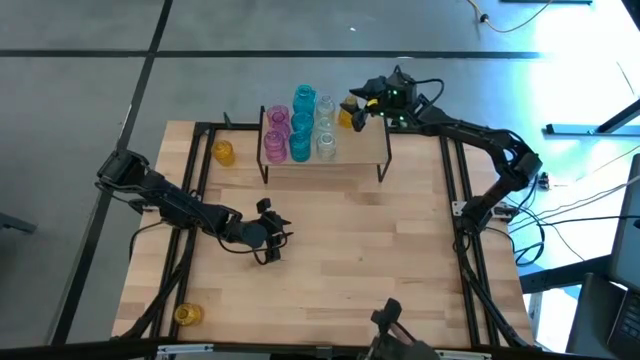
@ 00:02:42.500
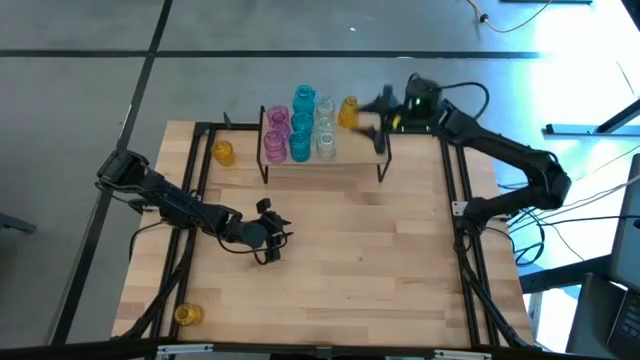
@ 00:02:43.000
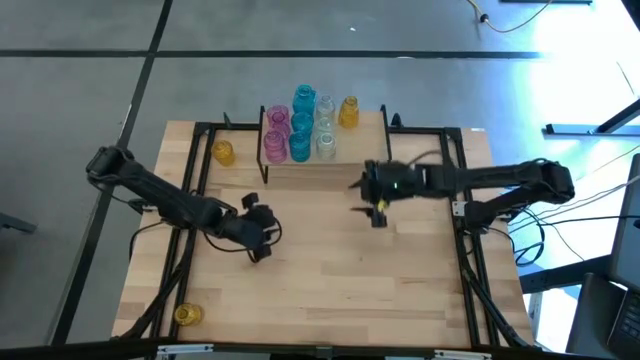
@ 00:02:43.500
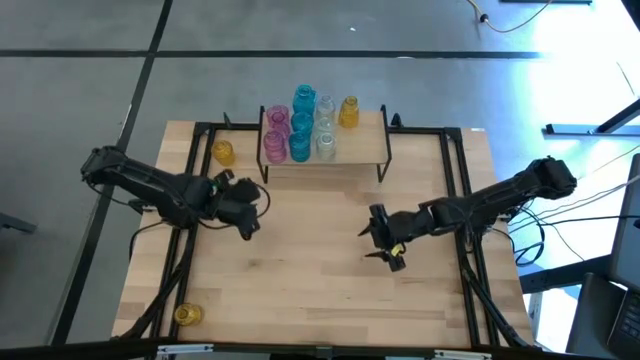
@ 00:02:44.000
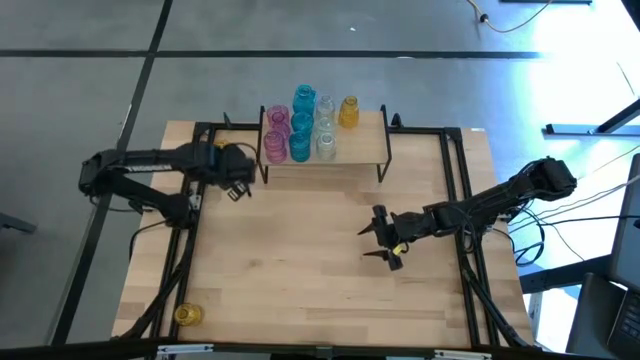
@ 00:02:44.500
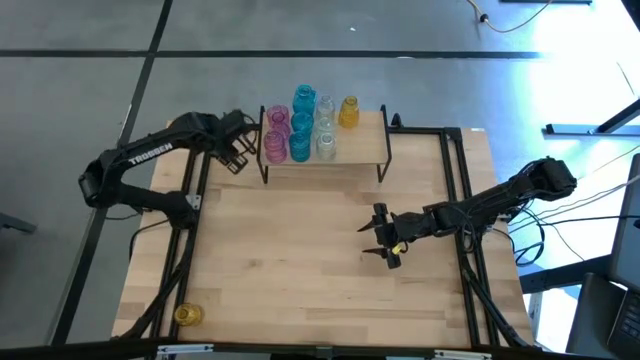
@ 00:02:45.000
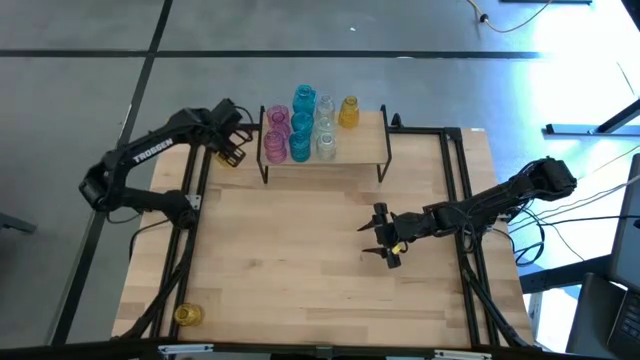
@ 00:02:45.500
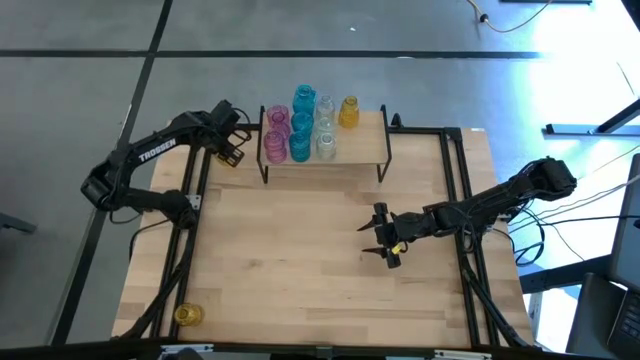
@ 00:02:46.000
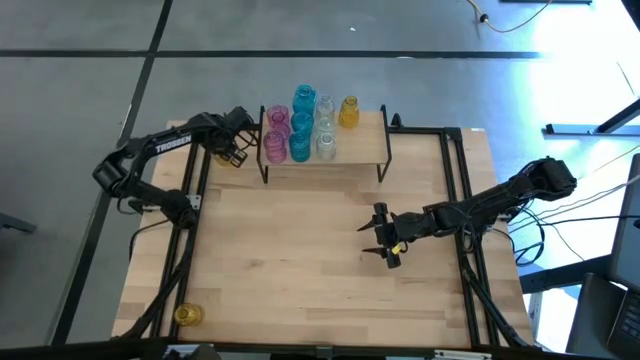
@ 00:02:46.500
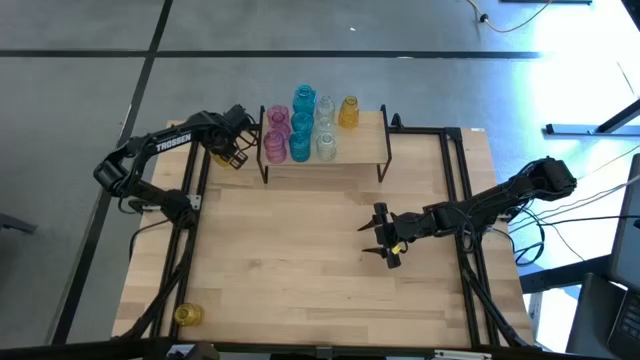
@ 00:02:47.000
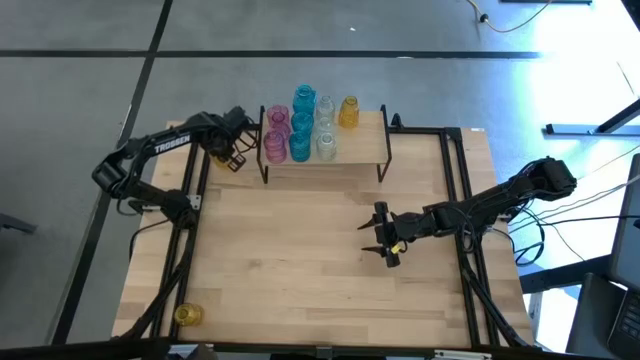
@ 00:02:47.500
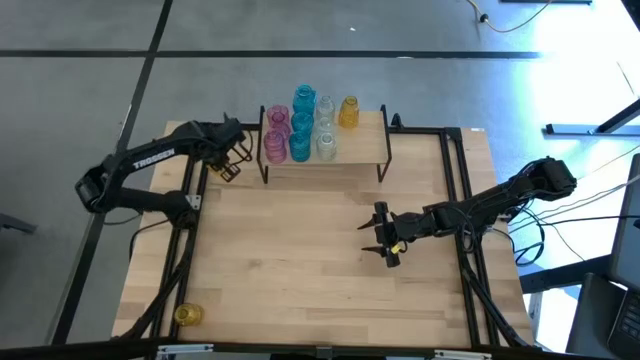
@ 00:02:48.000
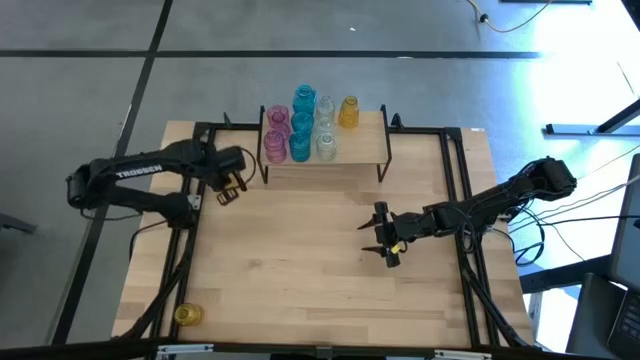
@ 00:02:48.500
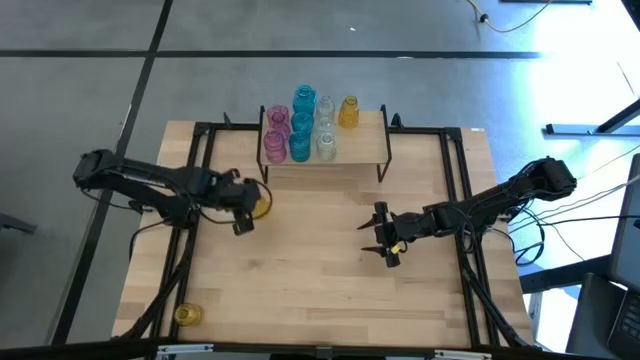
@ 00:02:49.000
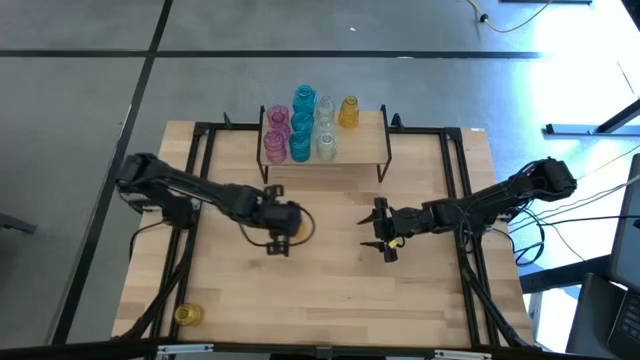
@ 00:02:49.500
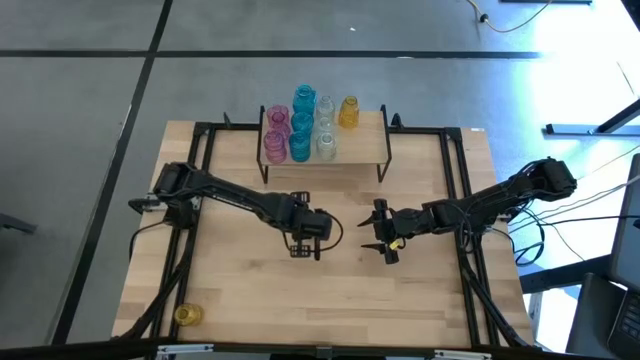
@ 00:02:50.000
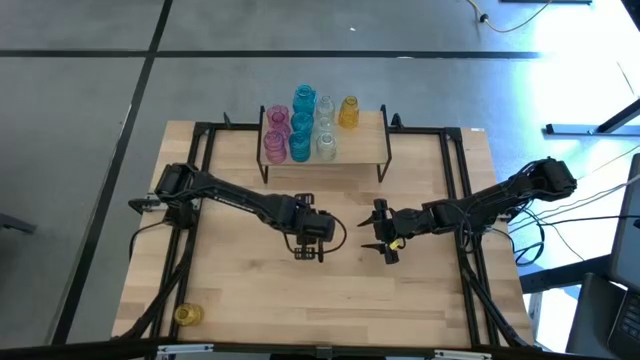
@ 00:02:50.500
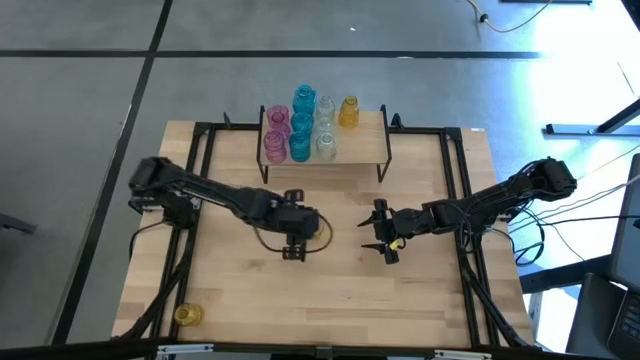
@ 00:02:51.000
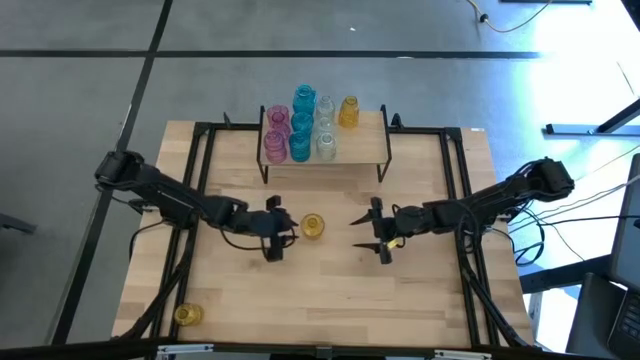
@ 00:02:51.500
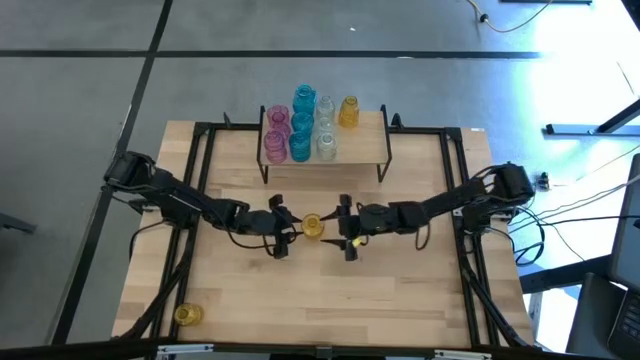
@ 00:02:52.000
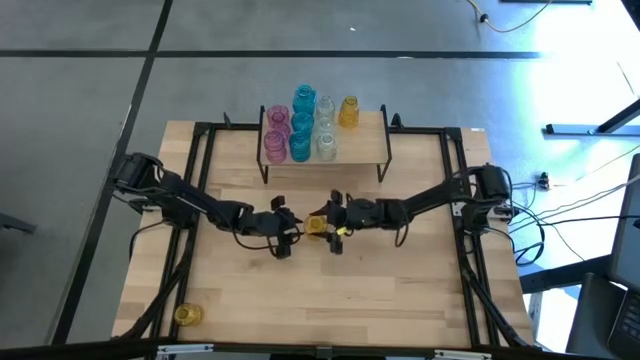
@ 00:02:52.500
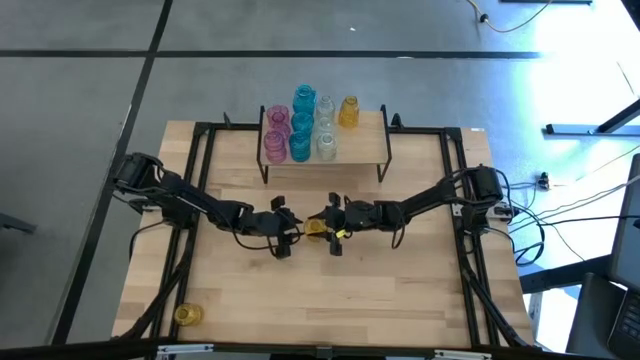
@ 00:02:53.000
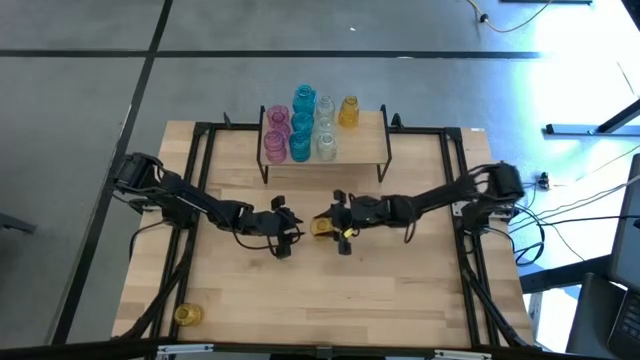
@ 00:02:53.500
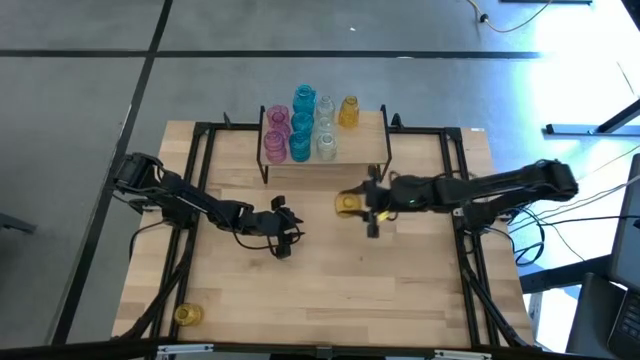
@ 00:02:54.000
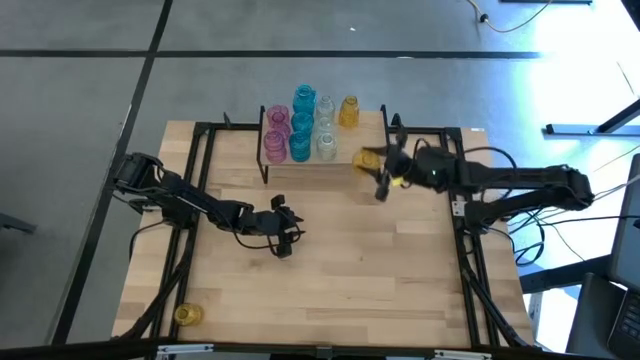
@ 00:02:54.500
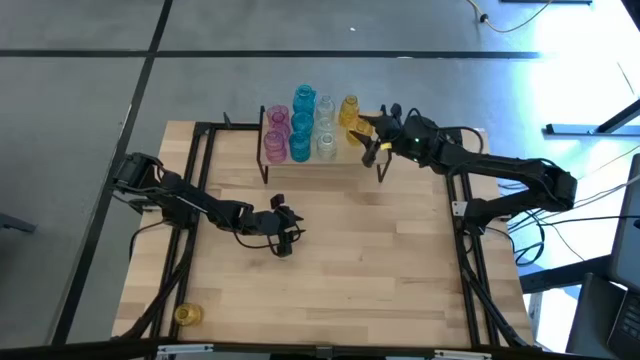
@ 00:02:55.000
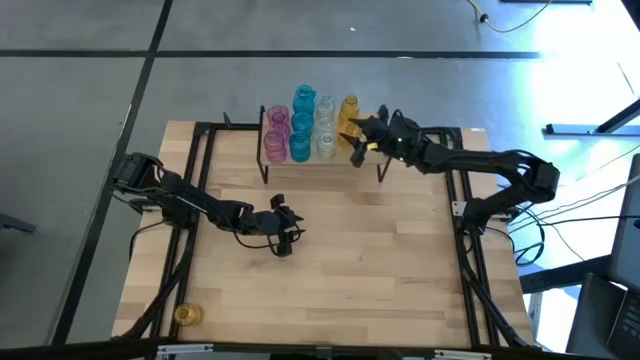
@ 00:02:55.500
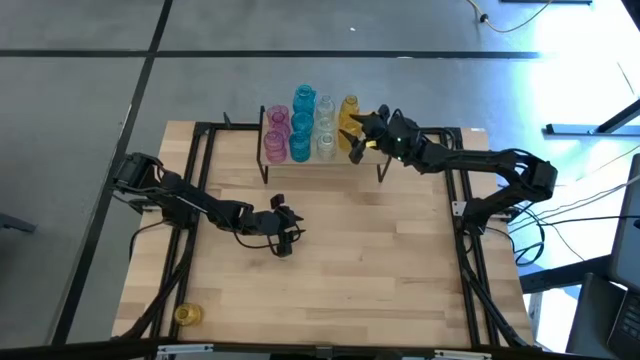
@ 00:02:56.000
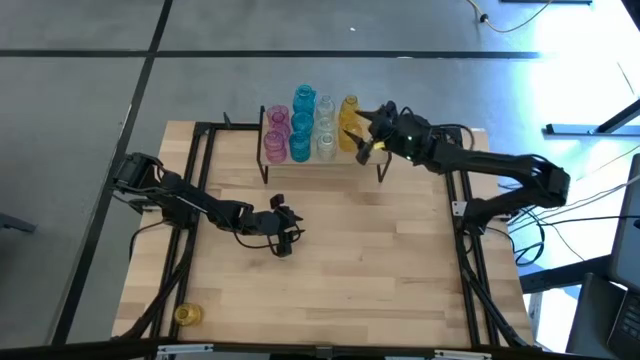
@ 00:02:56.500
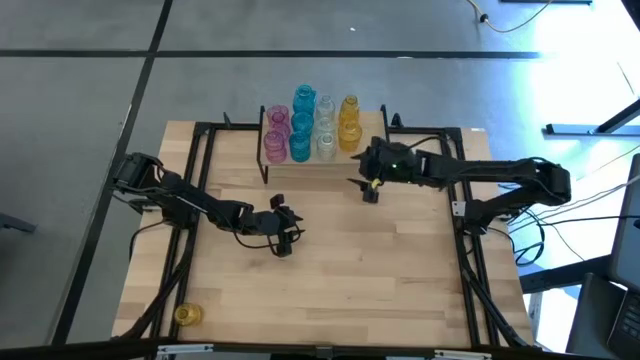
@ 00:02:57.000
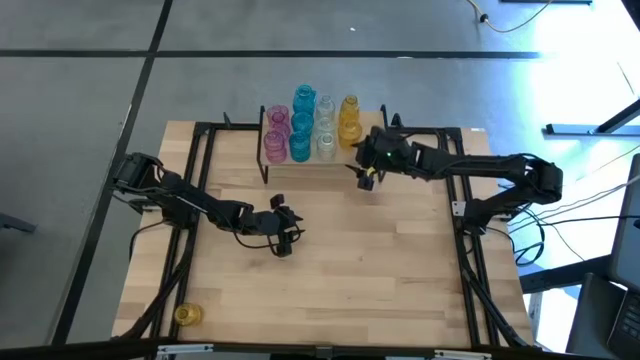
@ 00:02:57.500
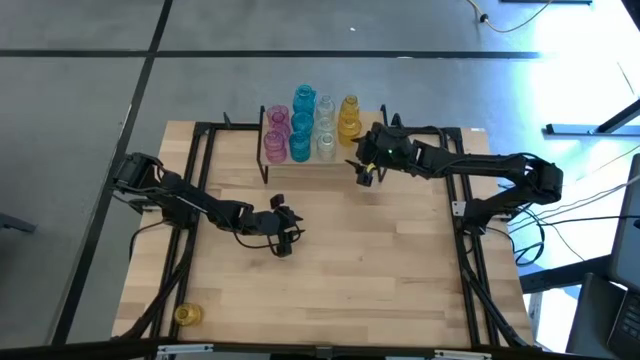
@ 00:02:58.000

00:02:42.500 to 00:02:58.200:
Task: sort vases onto shelf
Put the top yellow flower vase on the shelf aligned with the other yellow flower vase

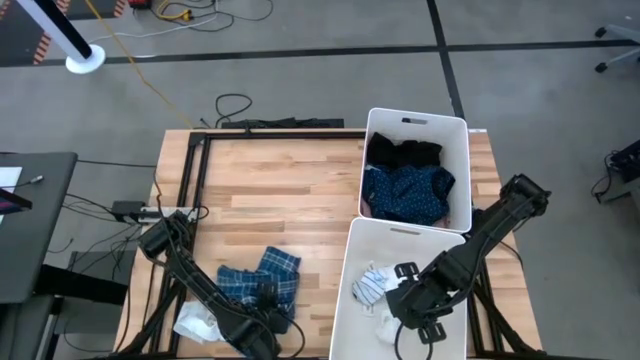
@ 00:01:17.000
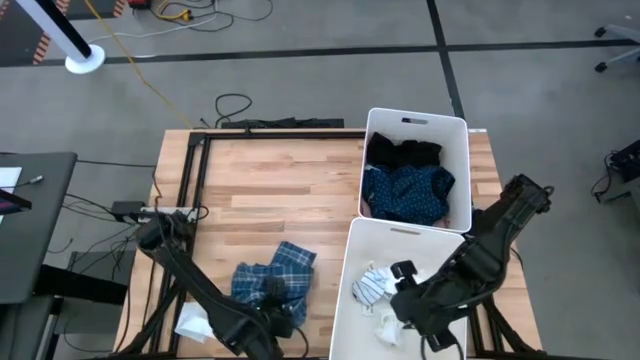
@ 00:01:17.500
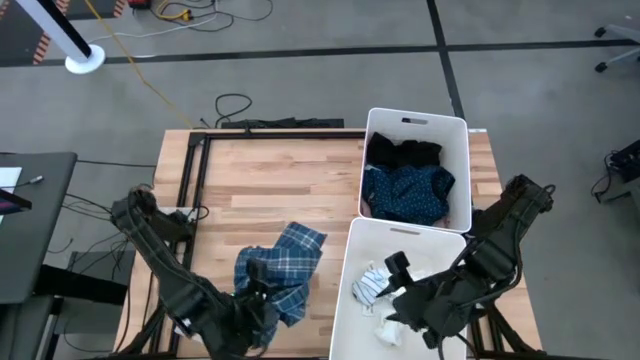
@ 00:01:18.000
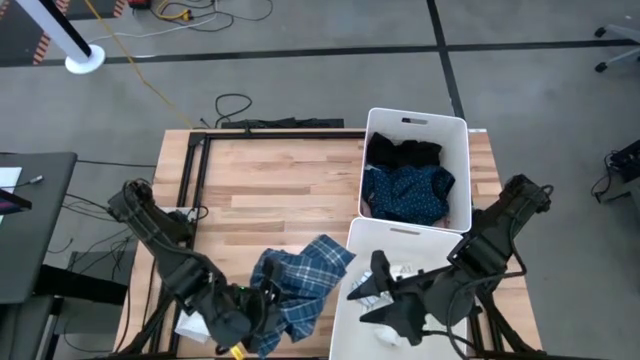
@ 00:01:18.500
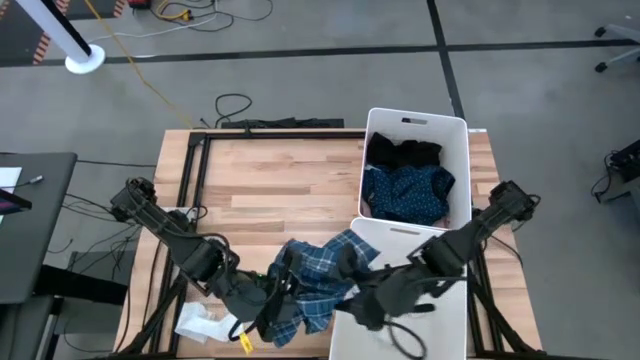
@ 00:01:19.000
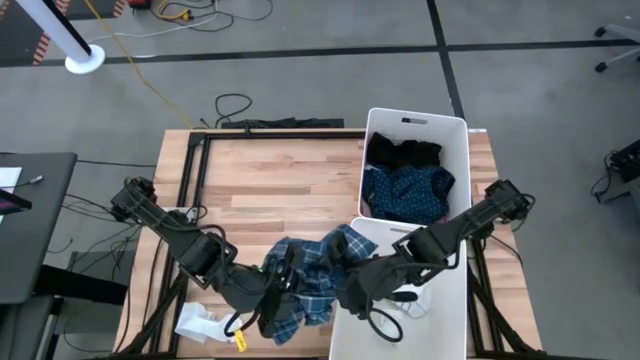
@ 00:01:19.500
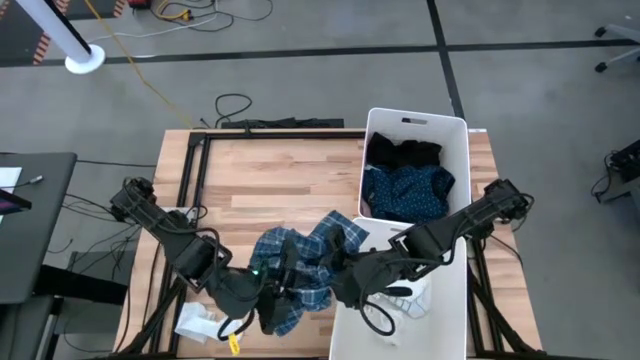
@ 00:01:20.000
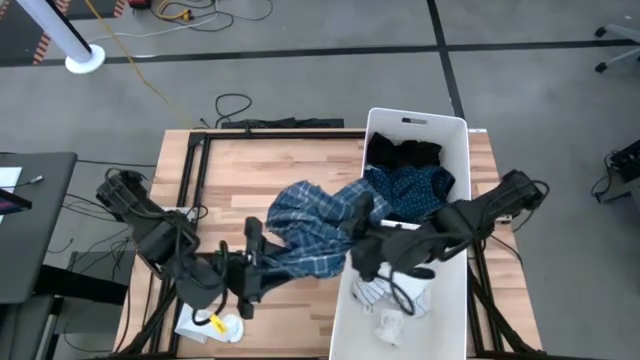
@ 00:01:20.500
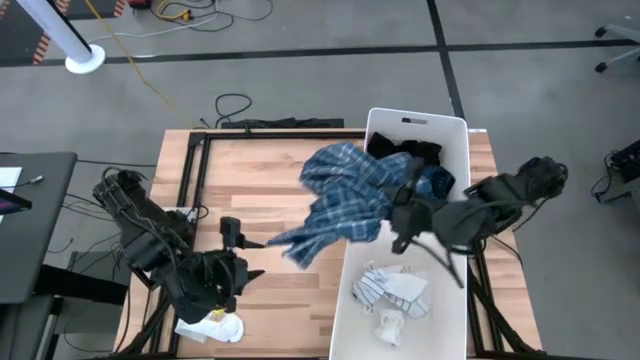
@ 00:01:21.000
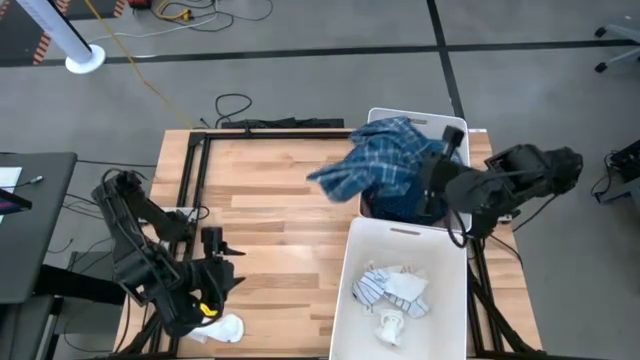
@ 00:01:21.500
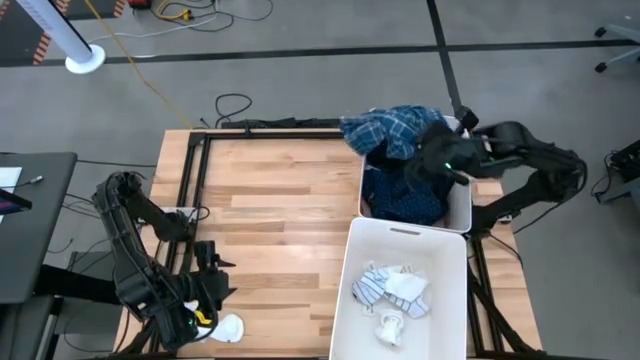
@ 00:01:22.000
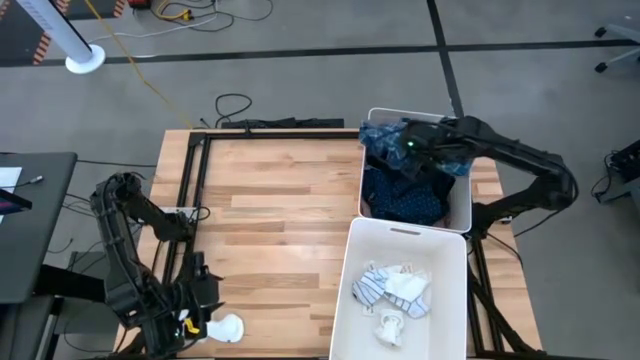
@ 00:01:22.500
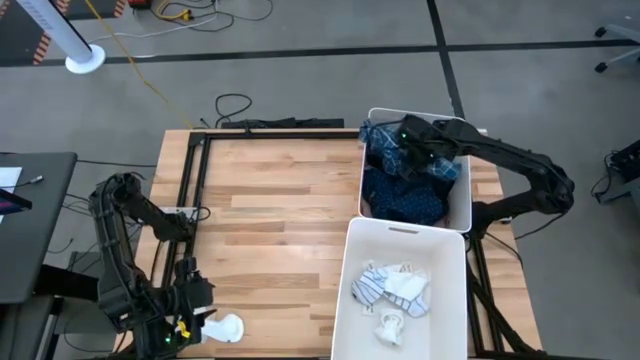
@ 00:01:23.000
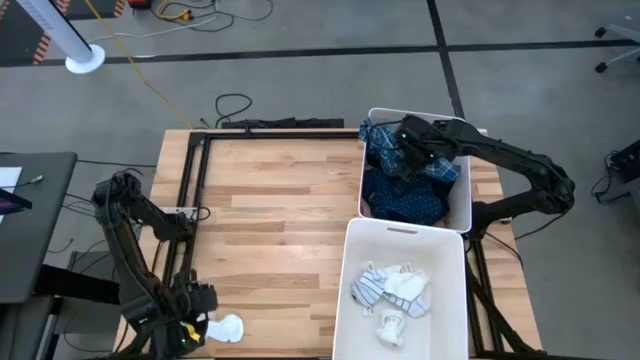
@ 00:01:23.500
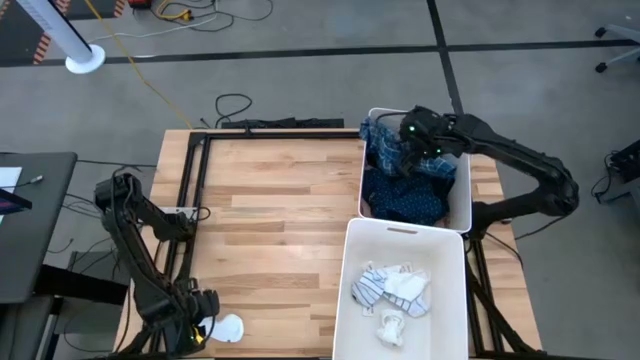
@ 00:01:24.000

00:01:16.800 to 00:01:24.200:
Task: Sort clothes
Put the blue striped polo into the top laundry bin
